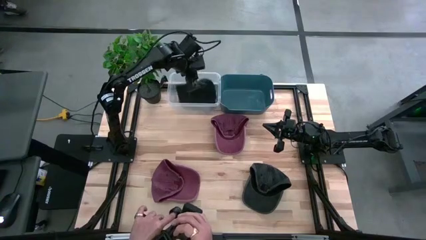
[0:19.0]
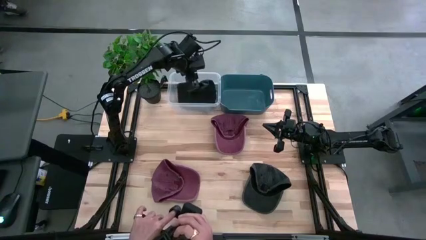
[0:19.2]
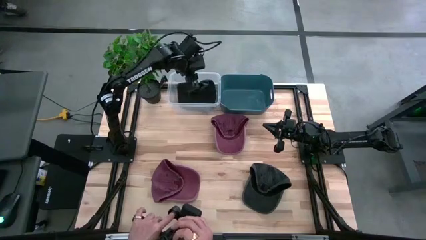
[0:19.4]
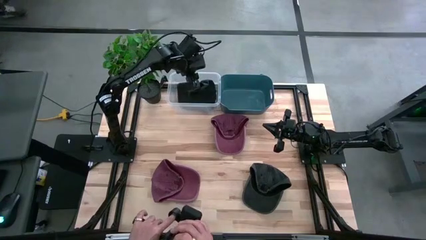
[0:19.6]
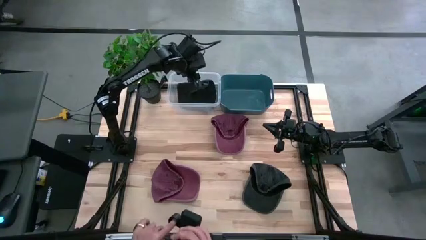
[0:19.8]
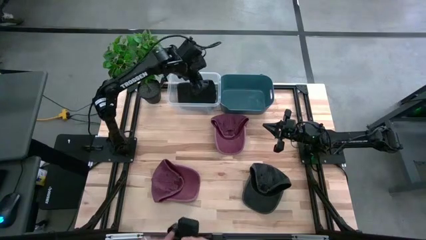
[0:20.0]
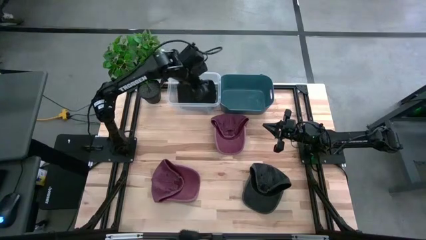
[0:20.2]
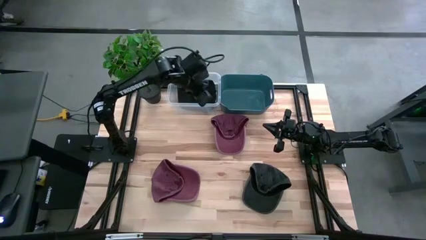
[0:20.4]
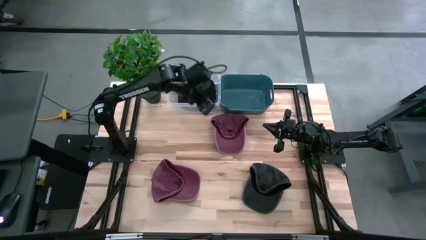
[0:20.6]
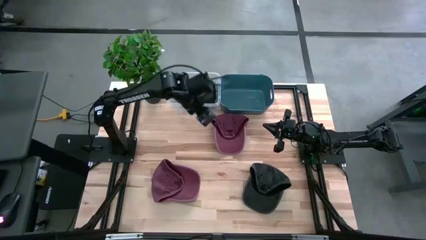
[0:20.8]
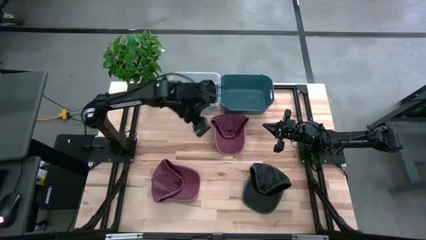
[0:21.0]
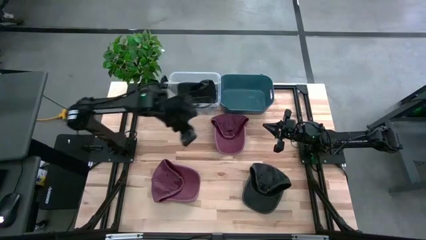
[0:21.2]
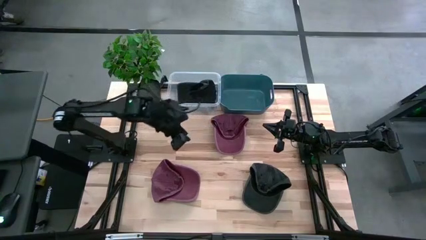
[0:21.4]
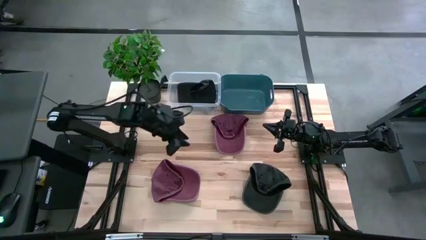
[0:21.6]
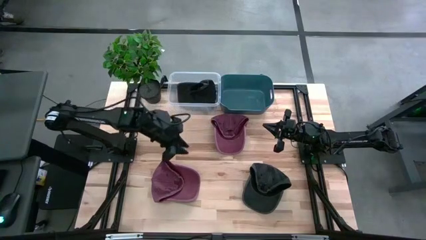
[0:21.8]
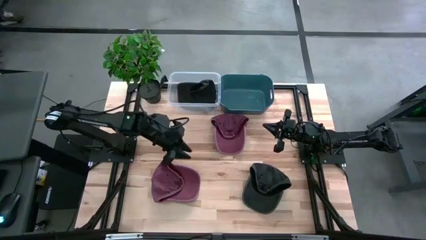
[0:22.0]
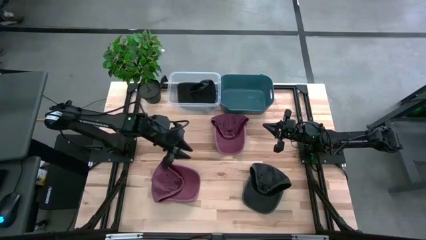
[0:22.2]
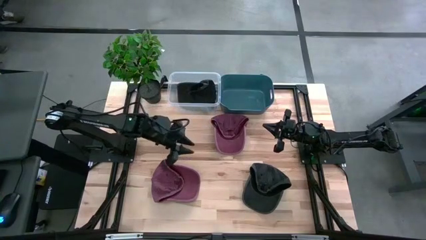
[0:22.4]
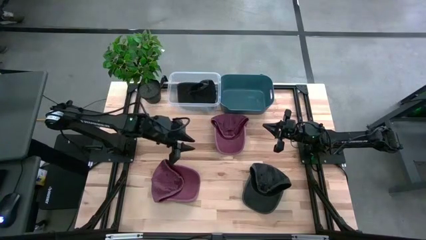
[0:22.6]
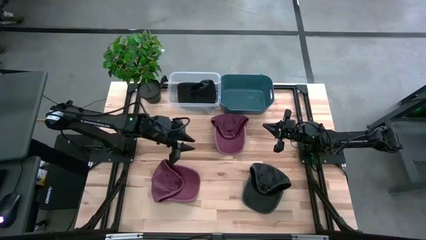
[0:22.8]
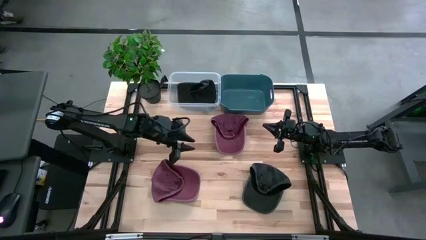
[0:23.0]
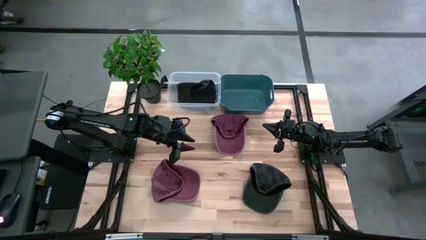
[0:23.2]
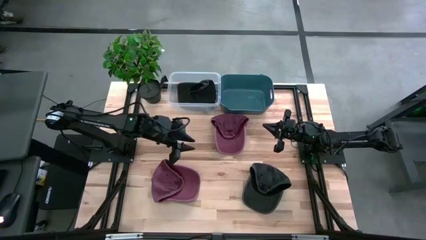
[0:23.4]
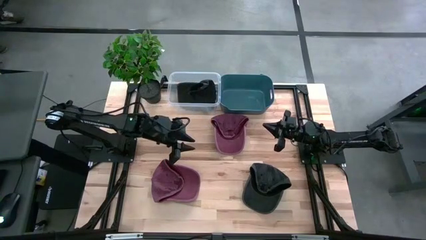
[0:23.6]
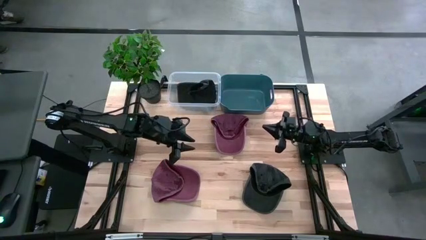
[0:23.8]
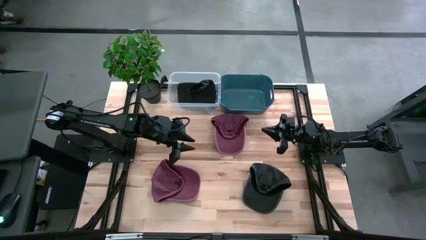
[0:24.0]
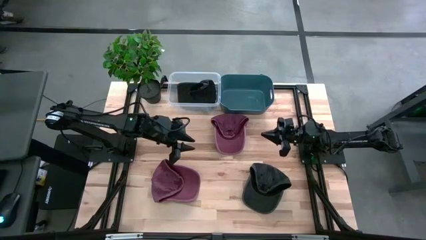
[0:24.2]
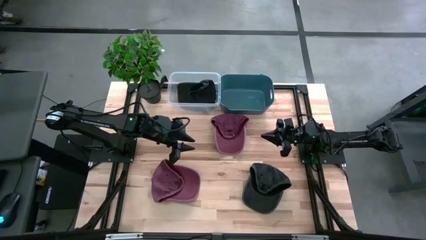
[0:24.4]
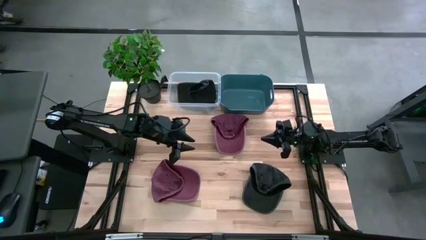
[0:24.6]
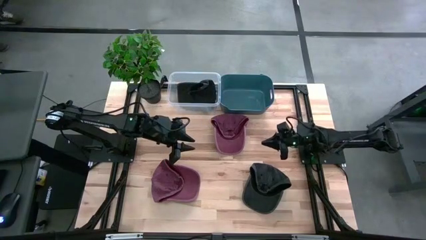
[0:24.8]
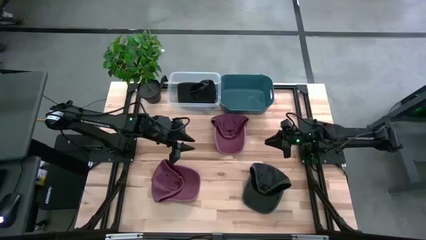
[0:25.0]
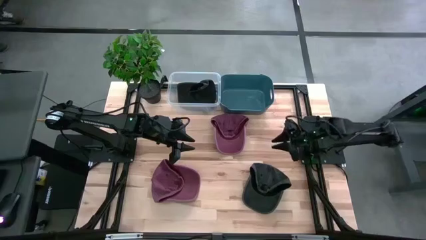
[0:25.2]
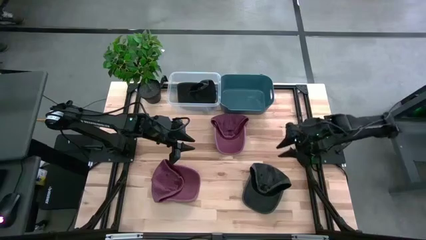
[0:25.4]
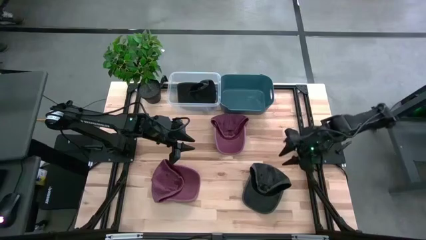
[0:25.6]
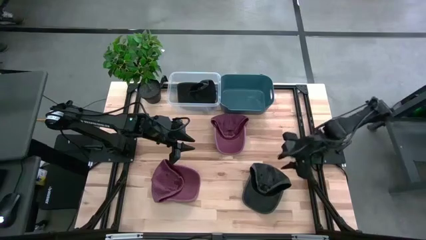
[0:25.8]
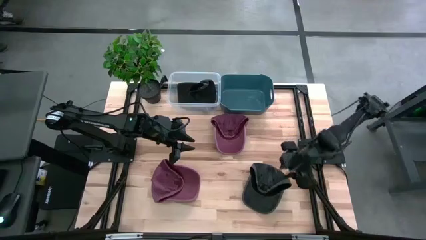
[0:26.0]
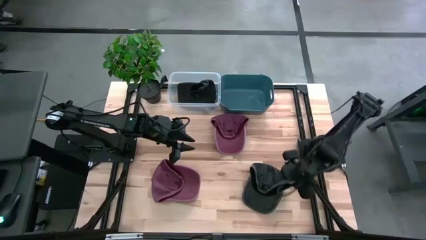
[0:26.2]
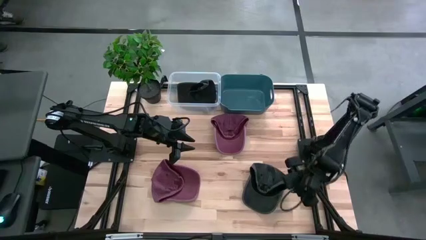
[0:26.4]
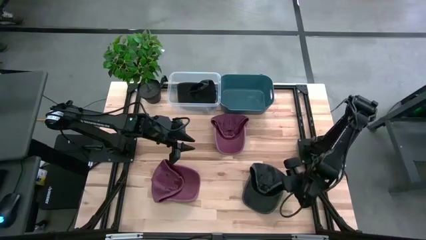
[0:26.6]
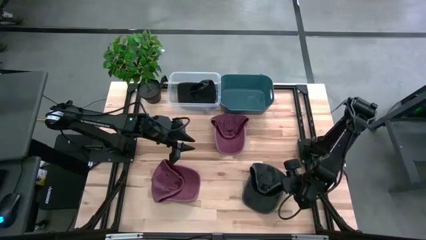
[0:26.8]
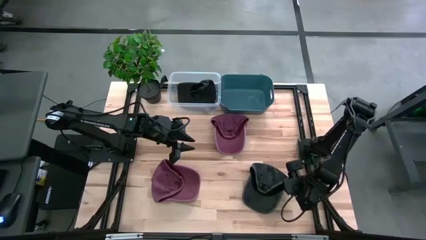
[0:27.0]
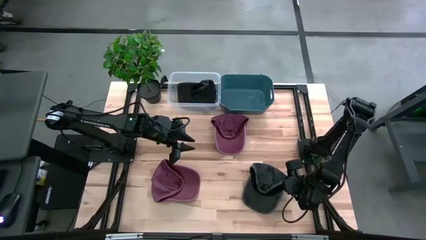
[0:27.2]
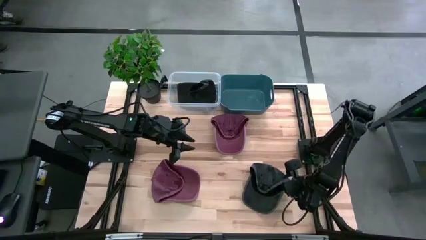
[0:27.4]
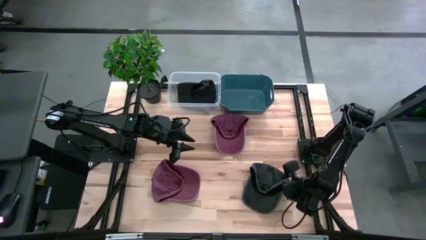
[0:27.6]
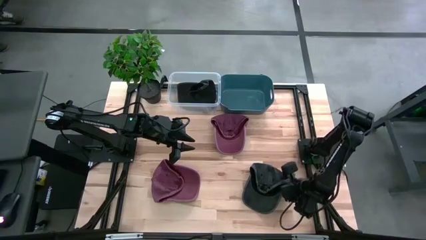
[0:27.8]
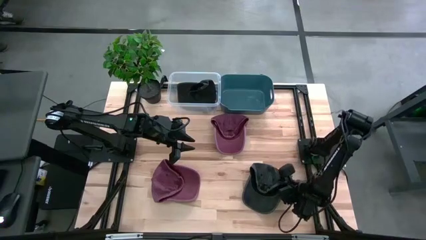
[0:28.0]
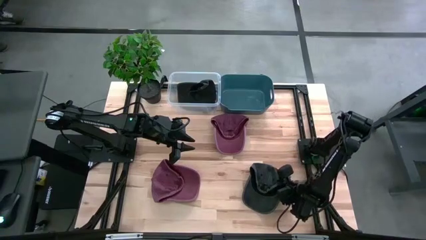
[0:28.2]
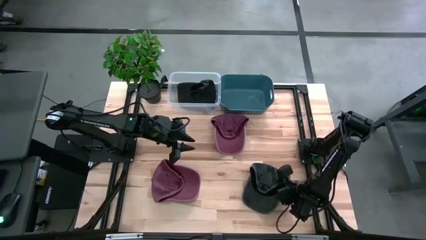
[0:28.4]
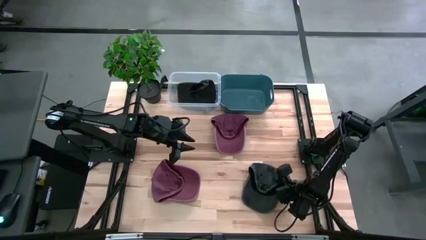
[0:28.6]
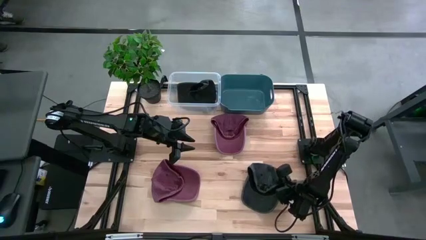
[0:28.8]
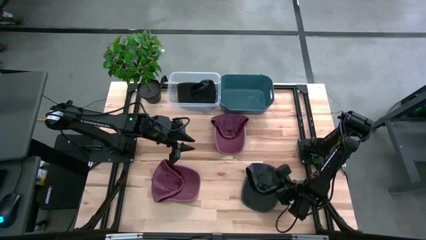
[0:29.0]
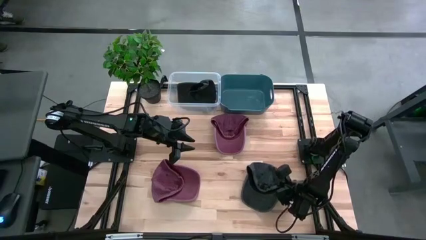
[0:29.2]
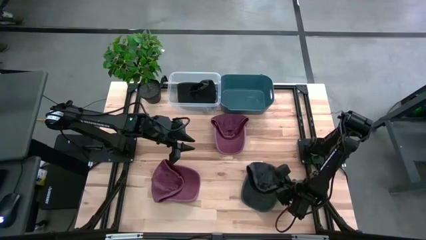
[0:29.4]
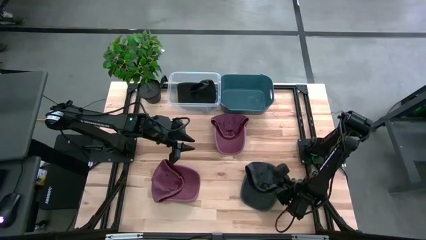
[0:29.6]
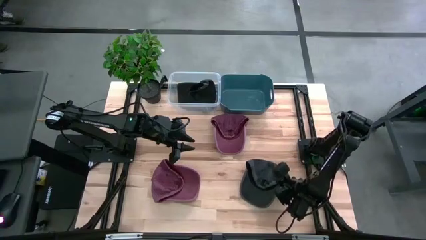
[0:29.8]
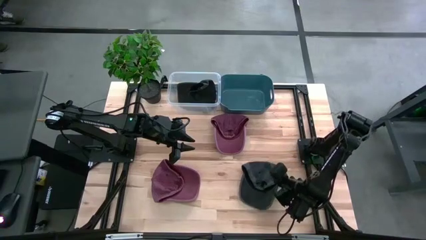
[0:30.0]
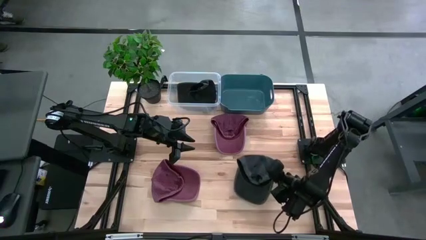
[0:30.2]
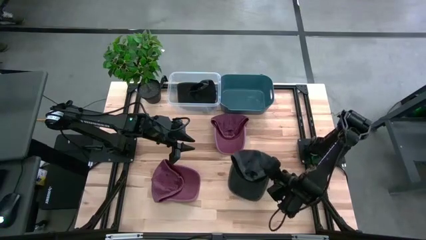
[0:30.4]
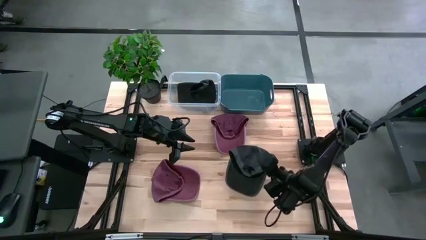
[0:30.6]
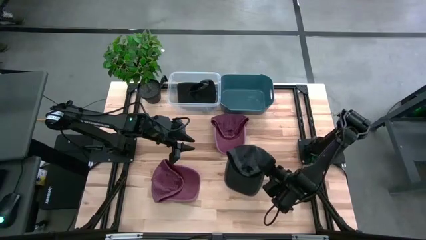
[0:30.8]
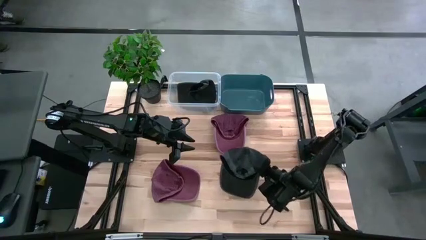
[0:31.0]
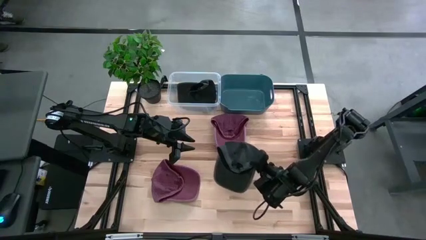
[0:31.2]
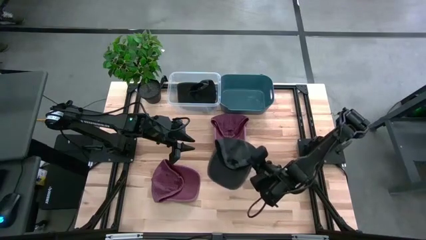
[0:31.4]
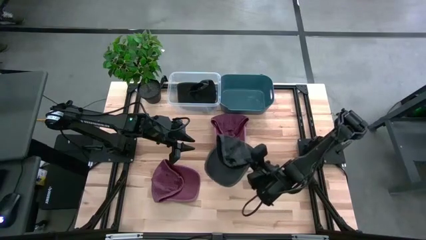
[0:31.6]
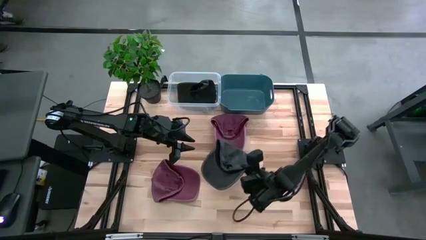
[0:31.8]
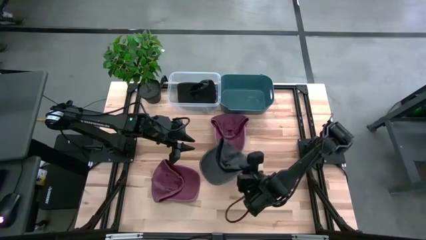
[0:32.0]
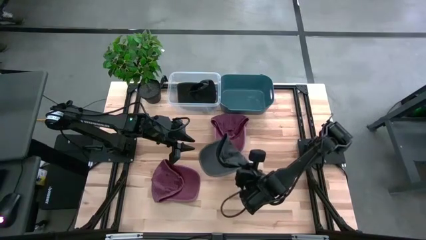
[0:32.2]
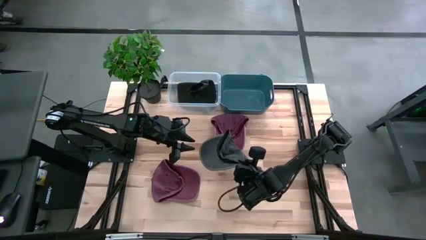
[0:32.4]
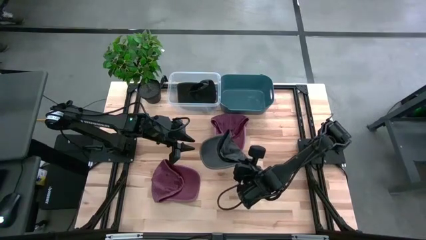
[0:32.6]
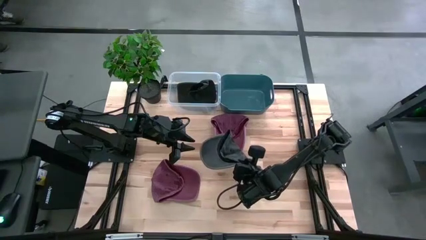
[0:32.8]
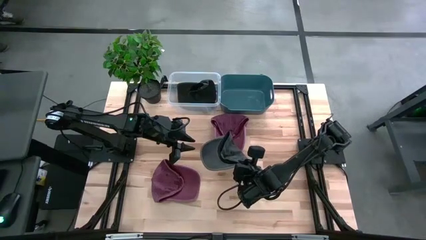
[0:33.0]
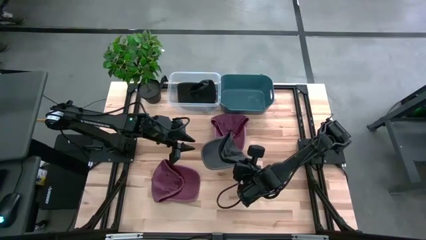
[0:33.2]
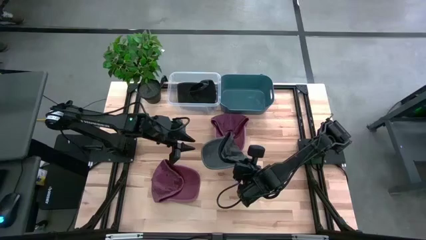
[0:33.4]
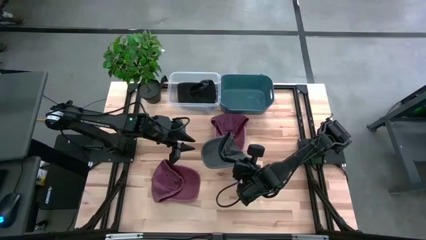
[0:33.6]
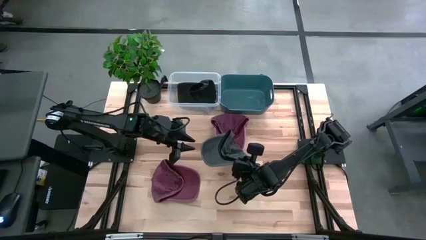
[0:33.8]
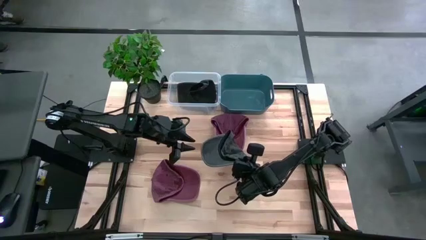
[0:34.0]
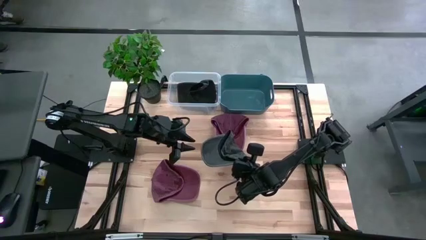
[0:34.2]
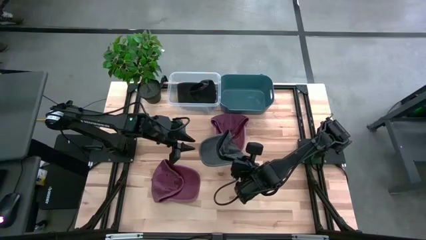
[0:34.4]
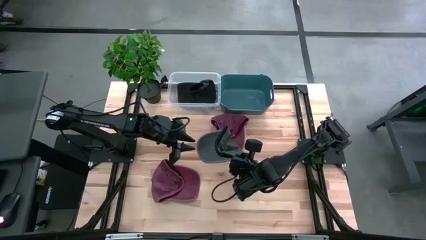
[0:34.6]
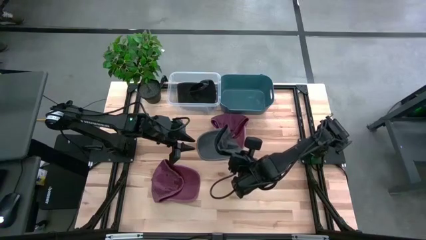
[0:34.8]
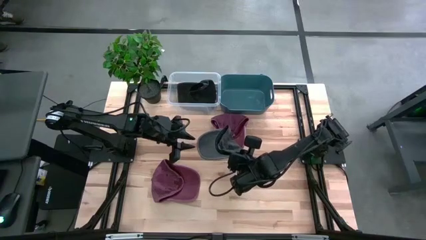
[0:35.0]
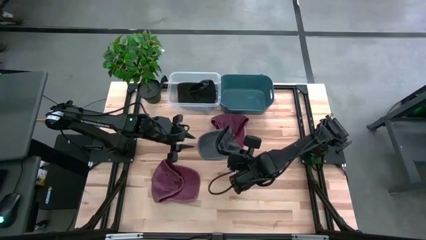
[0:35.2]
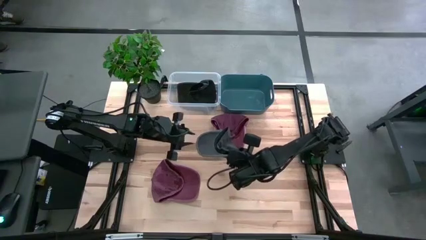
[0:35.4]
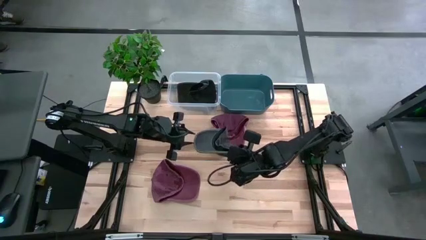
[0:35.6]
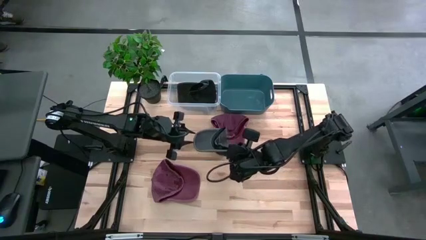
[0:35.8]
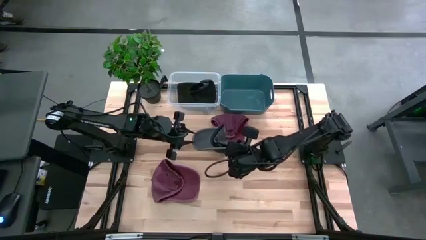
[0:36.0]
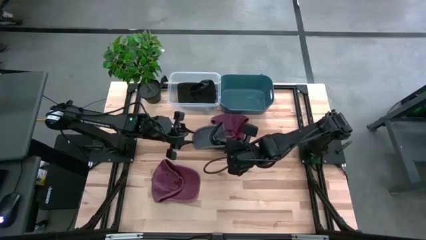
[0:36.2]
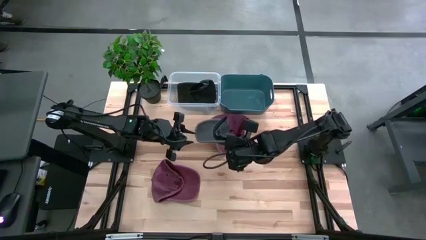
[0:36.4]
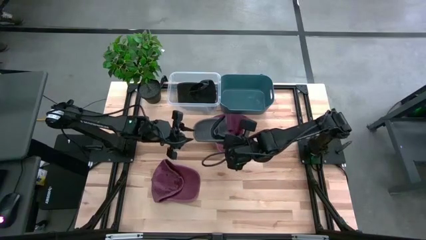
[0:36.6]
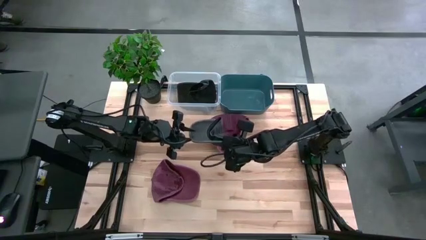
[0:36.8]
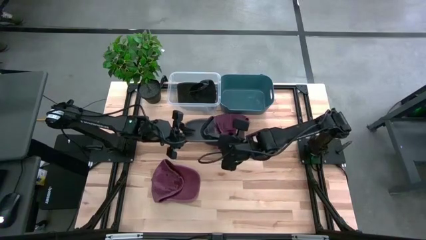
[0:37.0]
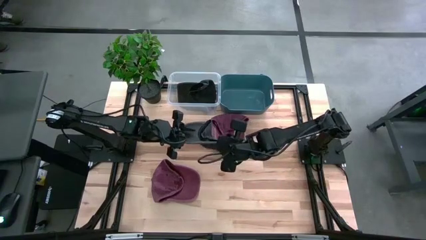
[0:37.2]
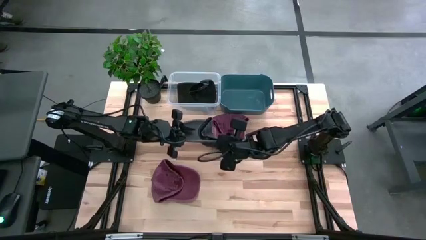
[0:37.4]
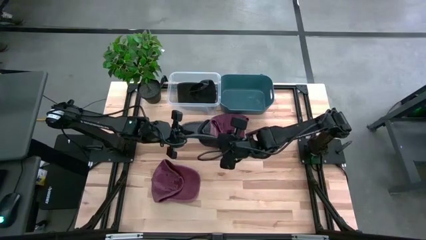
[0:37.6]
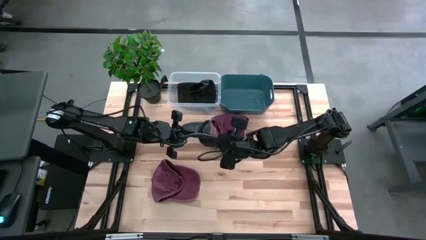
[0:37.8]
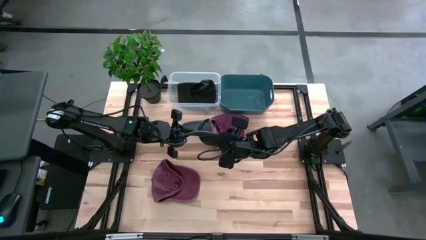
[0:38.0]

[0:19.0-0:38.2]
Task: Pick & Place hat
Put the black cap into the transparent bin
